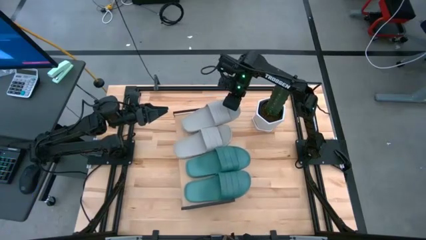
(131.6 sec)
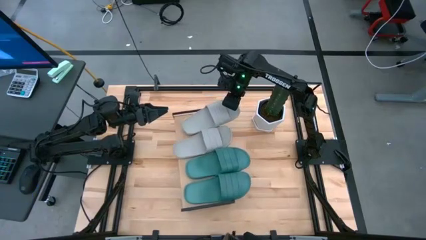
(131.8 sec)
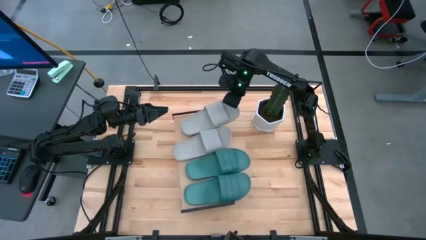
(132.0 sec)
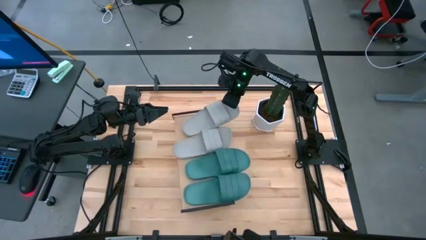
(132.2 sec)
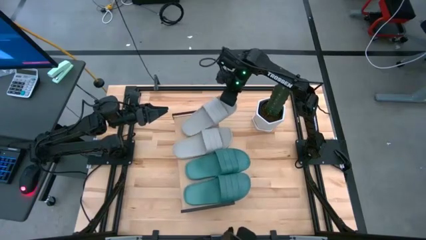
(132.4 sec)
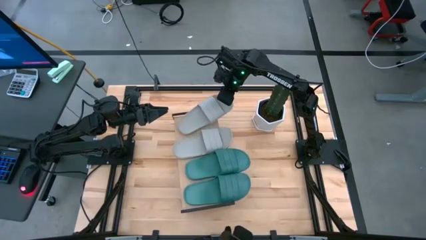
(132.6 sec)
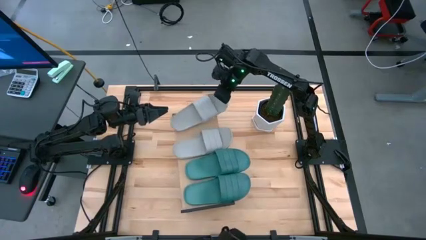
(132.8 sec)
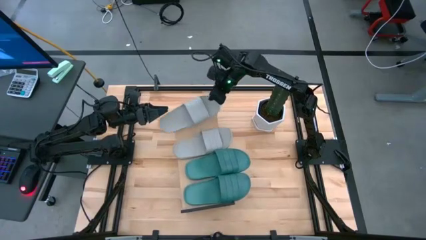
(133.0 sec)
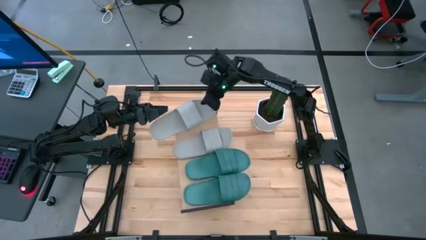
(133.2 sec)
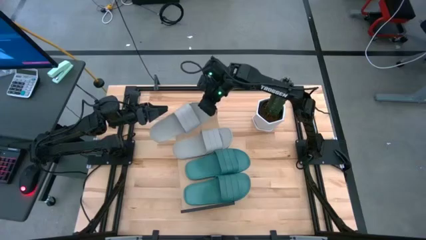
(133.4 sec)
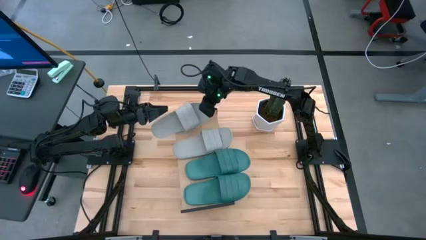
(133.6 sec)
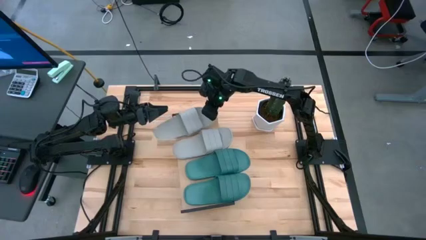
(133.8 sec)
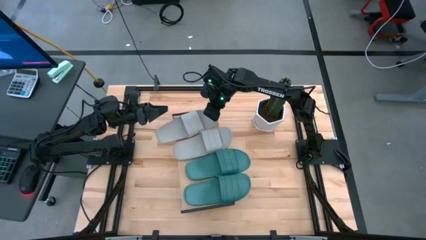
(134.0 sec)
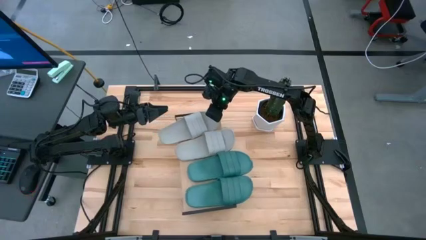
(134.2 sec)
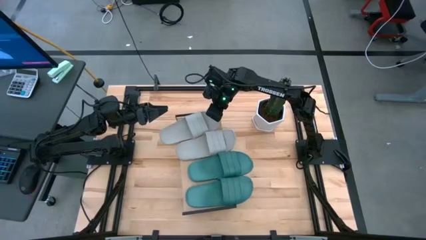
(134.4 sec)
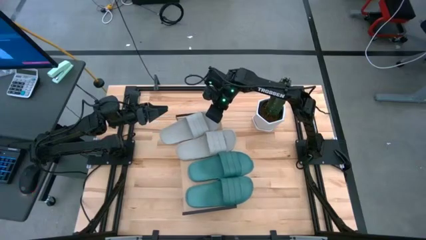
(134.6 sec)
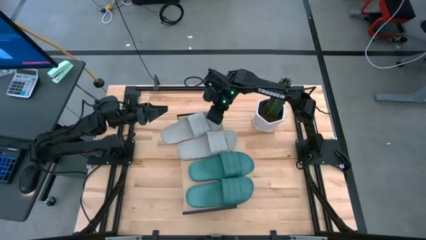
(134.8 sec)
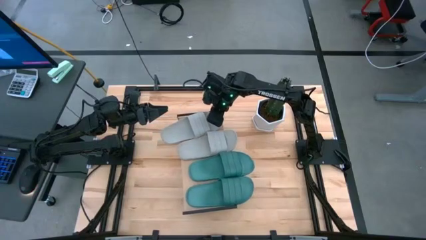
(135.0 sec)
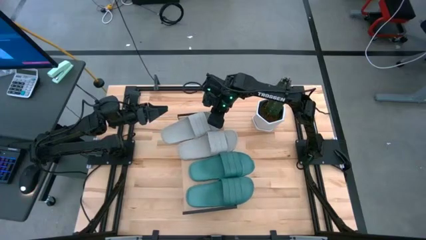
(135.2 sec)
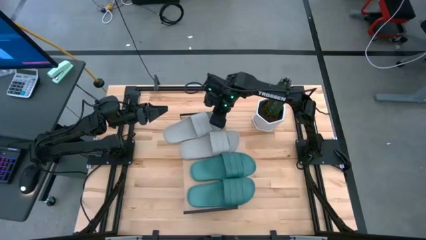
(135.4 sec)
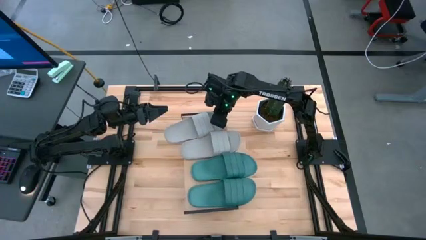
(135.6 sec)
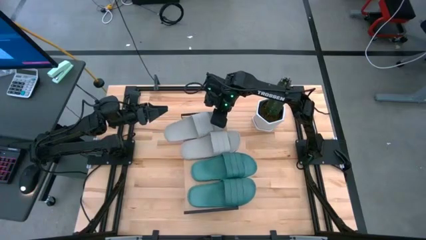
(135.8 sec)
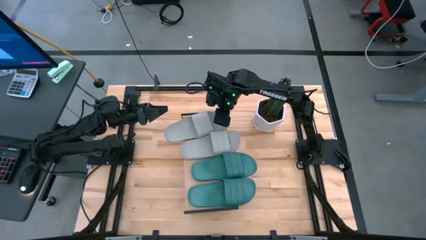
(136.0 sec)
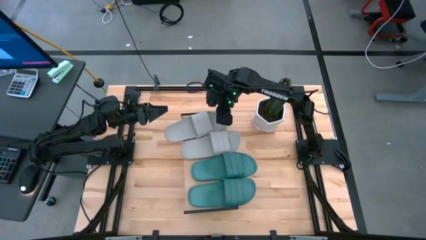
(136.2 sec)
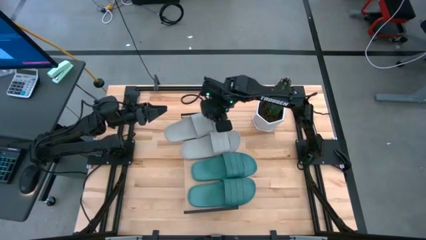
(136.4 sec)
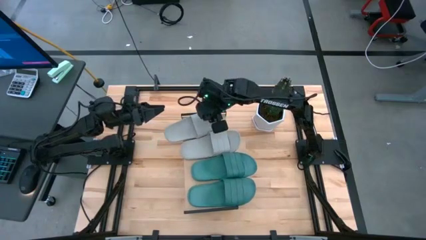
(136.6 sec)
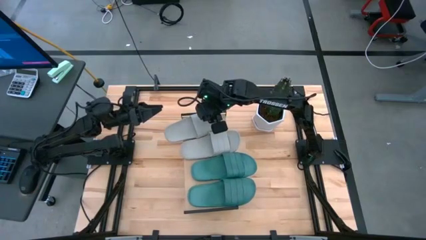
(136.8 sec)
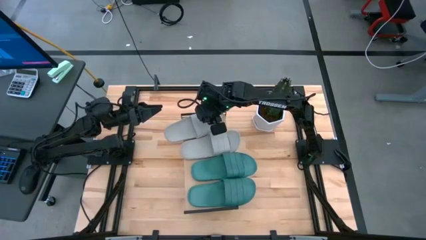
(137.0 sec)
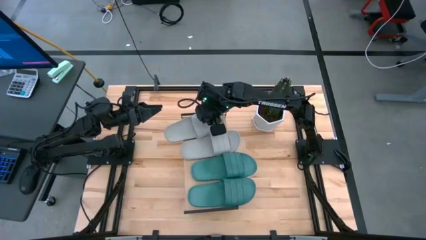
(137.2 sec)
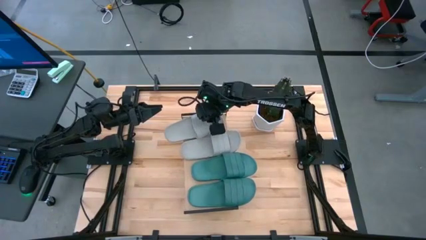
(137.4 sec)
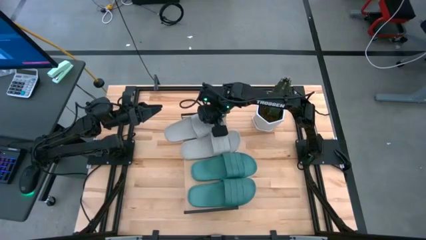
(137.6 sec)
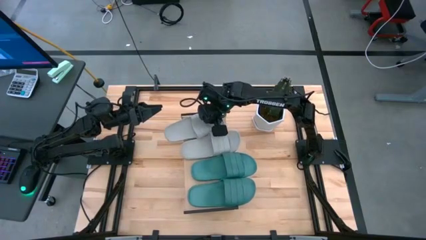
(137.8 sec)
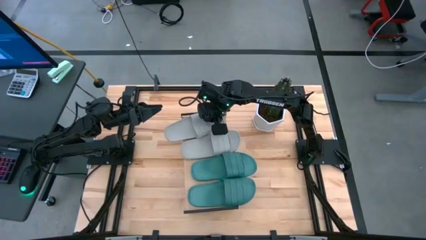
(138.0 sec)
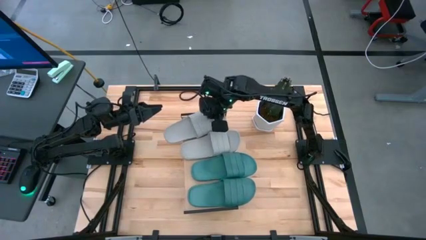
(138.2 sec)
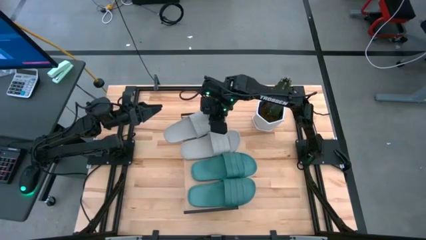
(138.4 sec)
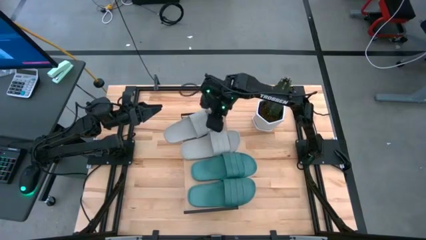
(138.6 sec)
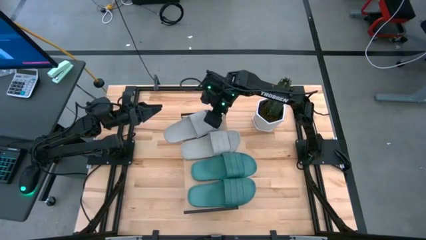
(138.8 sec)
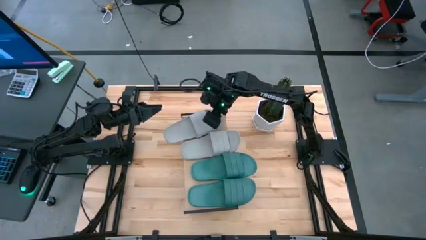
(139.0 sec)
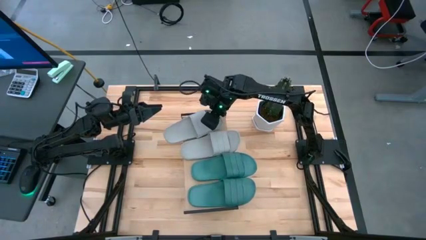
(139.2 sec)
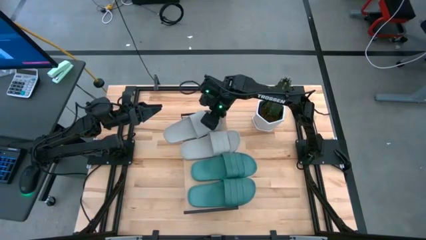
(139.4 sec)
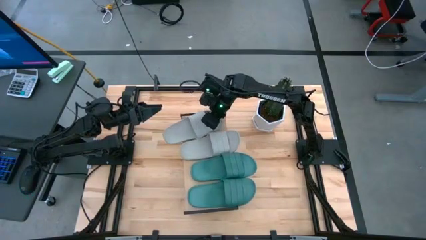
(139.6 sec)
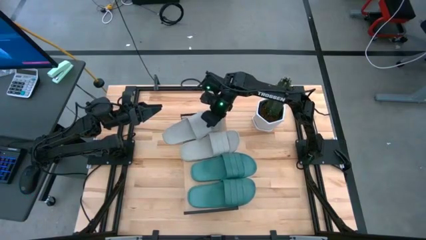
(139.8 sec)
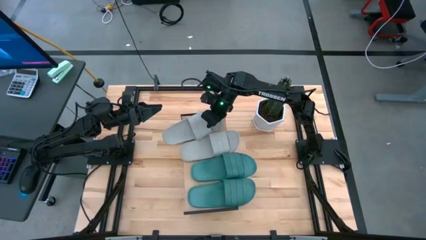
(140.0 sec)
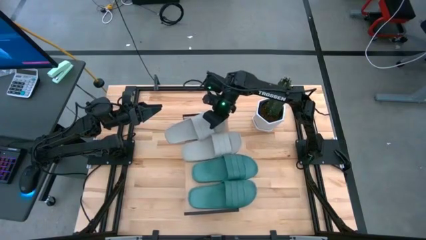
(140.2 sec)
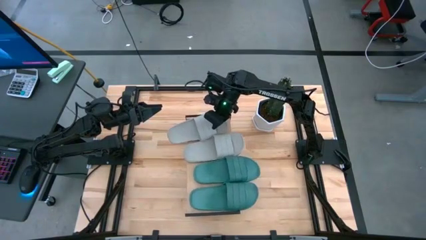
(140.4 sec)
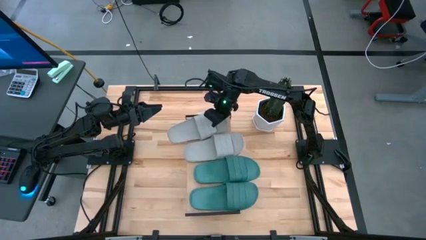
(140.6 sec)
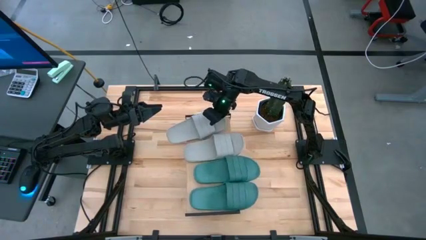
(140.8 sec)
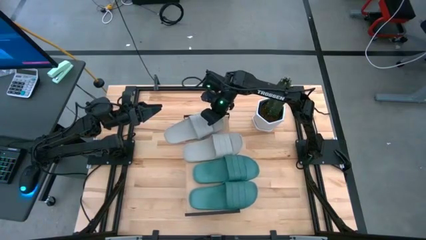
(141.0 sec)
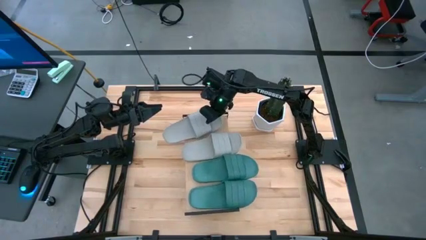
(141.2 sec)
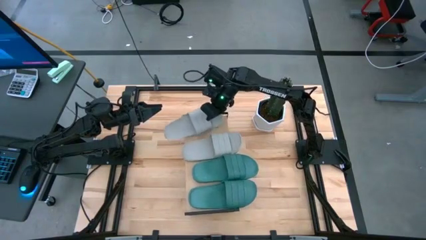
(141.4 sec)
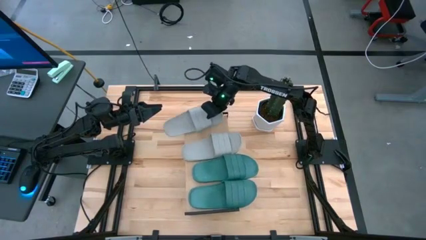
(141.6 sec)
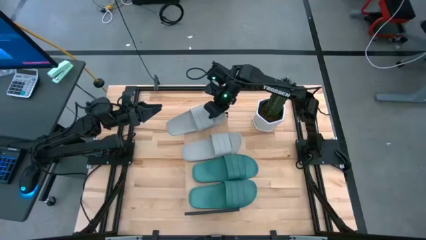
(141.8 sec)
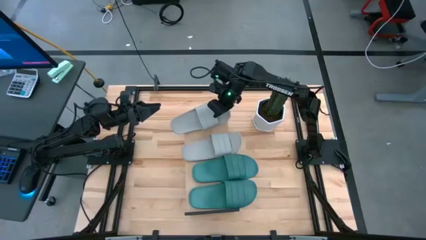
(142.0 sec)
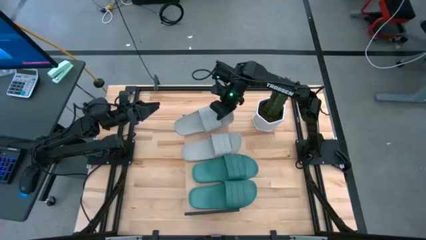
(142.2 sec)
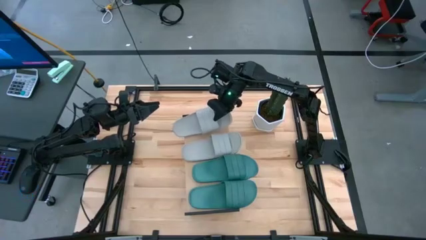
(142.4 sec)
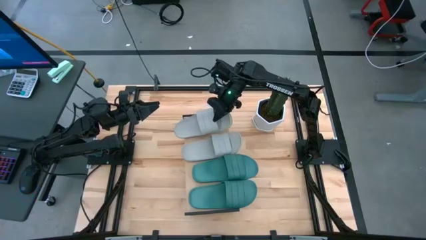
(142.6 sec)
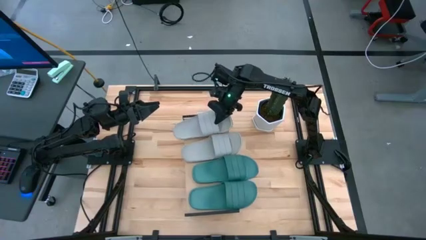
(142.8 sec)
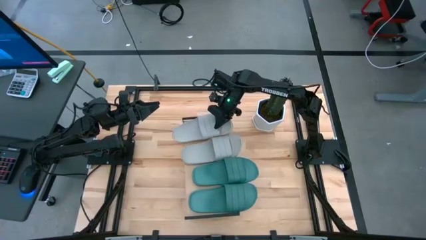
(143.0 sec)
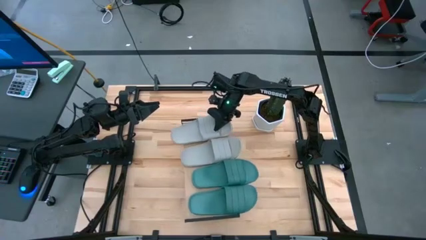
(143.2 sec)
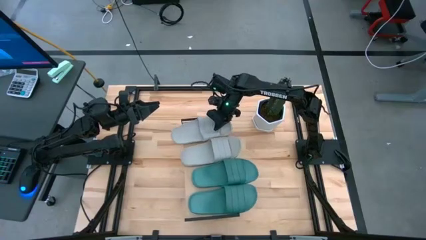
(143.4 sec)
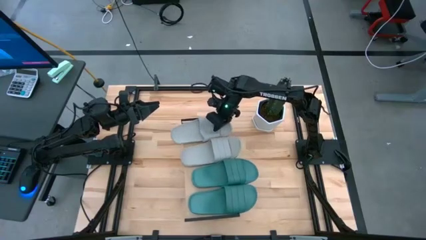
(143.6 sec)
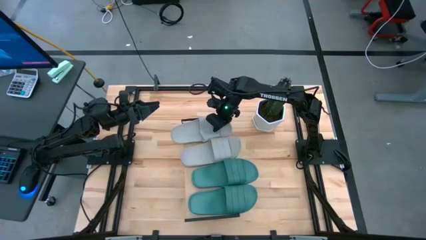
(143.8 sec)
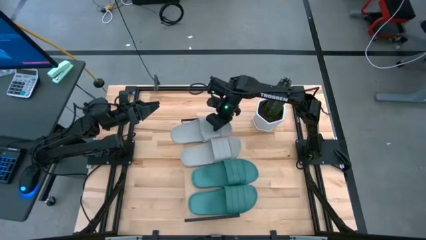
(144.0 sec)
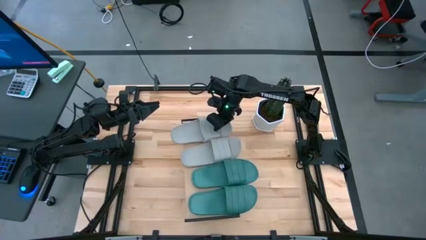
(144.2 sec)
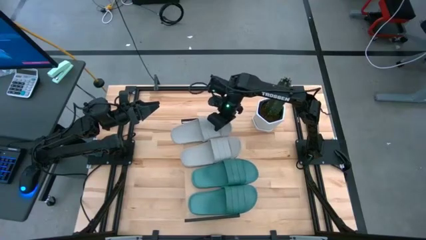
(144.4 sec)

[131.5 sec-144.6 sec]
Task: Pick and place slides into the shelf
Adjust the white slipper

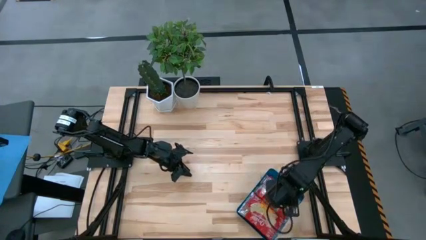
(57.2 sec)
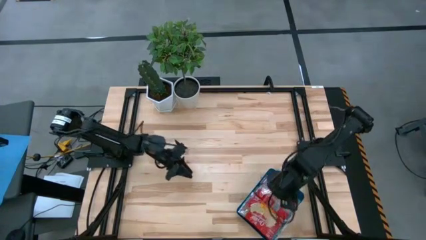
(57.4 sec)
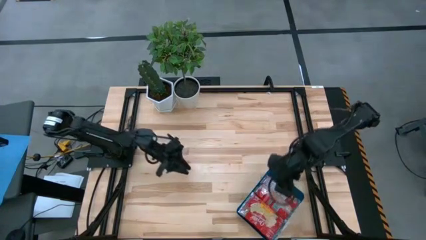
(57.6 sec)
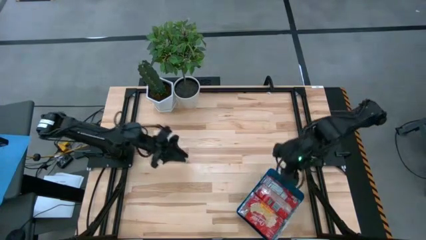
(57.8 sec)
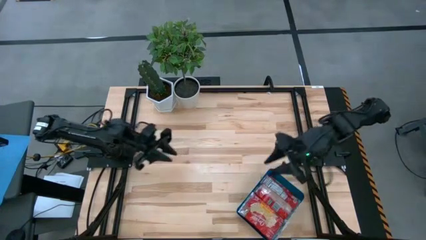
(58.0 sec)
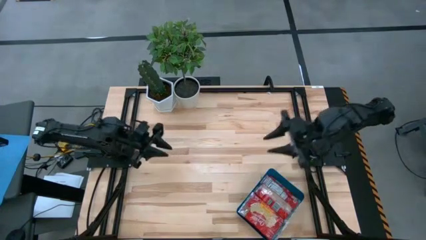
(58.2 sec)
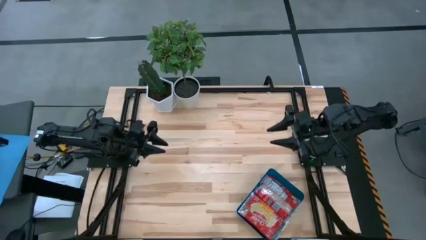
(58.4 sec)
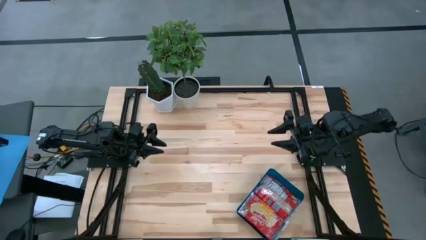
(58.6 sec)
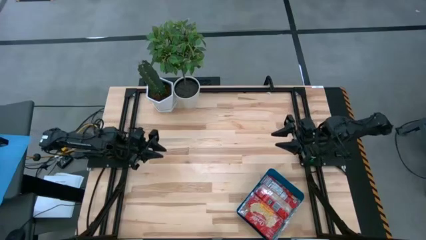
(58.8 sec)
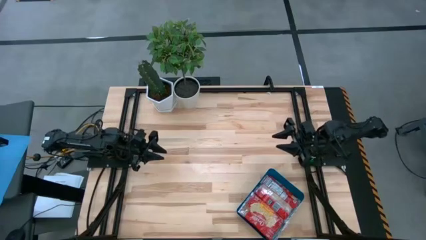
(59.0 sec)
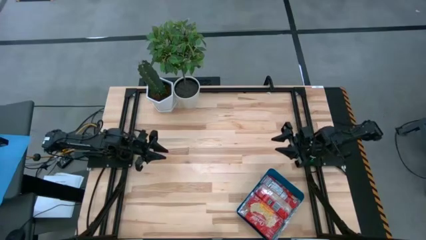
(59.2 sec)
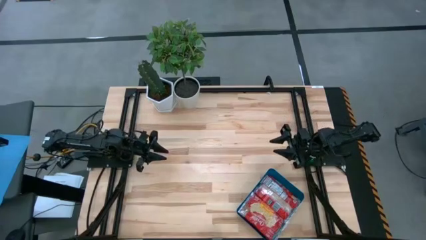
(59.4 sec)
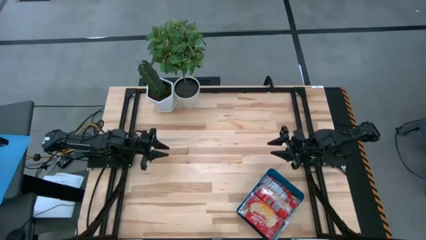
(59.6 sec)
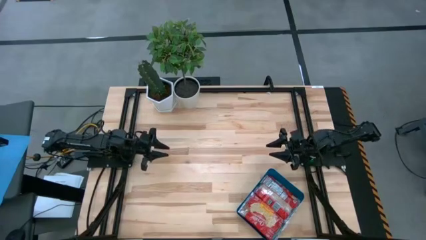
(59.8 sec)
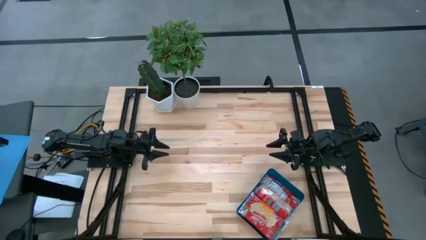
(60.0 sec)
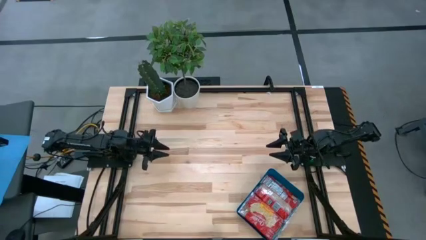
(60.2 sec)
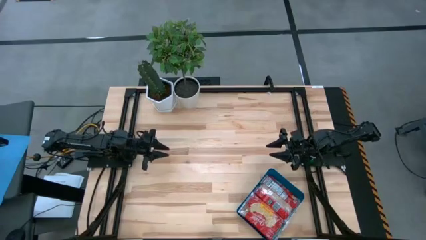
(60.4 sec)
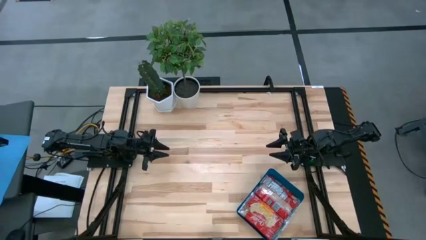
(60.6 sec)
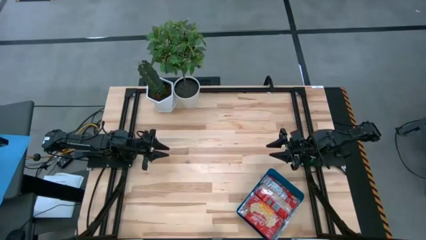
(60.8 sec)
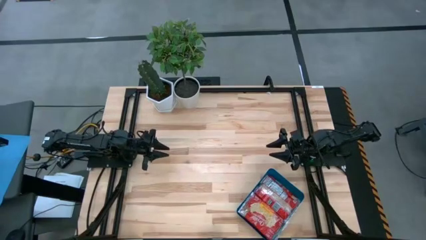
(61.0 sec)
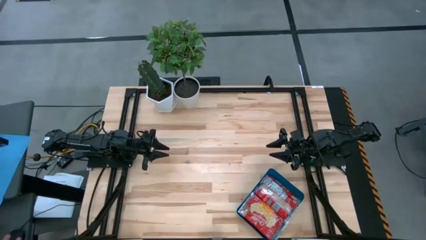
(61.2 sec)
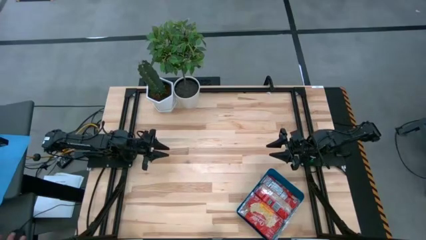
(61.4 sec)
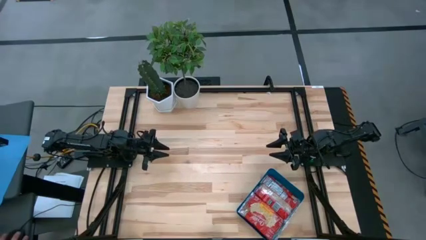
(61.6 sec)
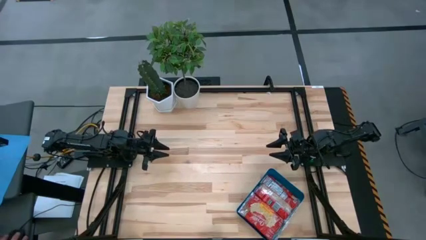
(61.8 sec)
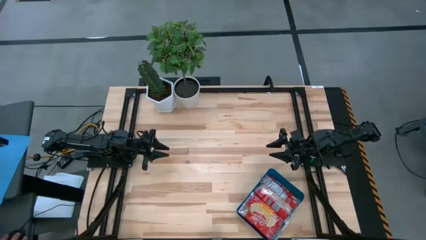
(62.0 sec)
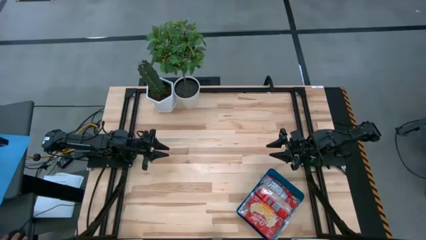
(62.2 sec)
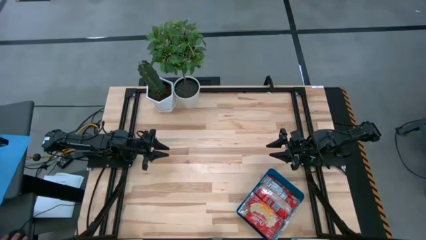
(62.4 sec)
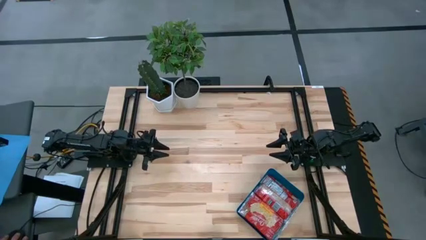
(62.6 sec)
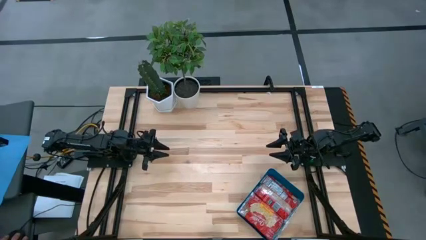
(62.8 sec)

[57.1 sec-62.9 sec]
Task: Sort popcorn bags into baskets
Return to Home Position
